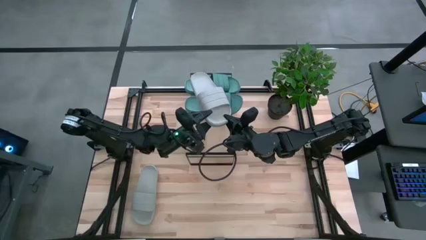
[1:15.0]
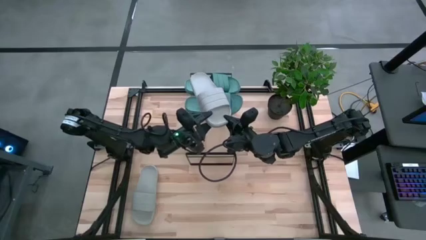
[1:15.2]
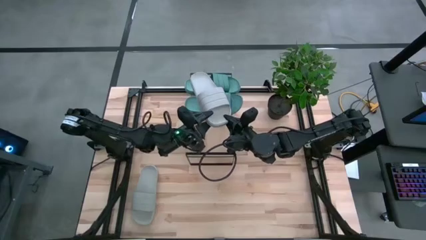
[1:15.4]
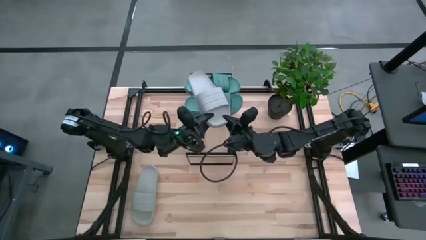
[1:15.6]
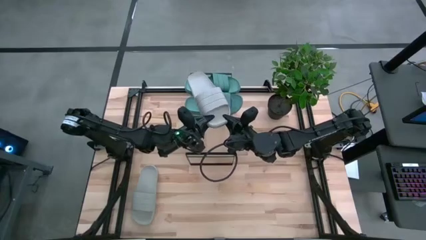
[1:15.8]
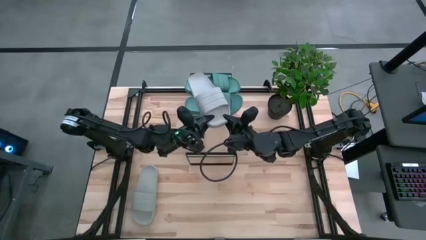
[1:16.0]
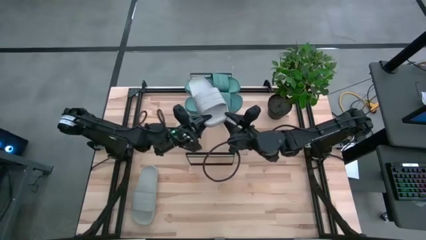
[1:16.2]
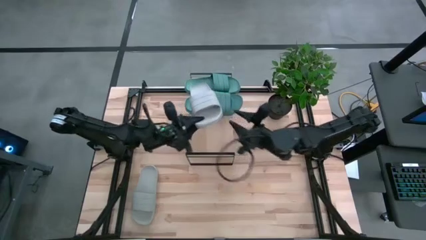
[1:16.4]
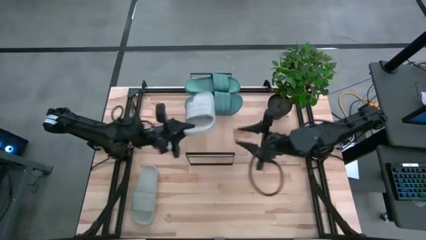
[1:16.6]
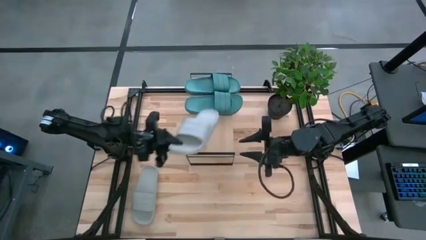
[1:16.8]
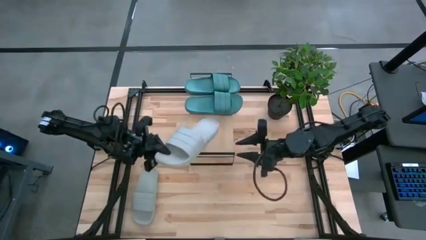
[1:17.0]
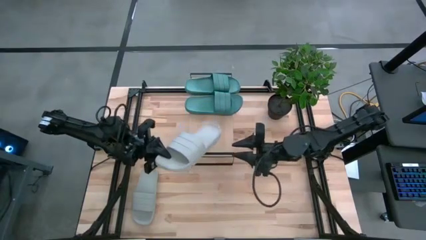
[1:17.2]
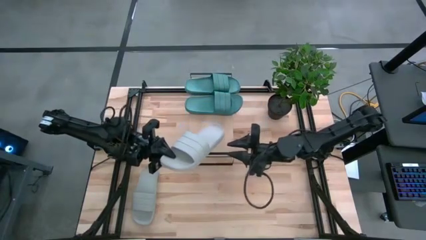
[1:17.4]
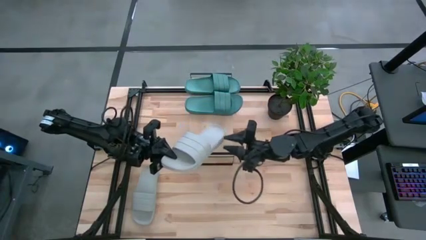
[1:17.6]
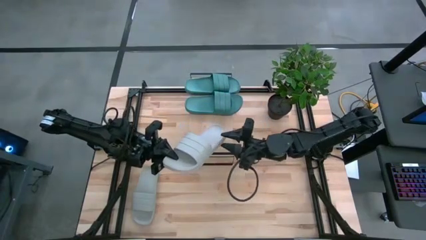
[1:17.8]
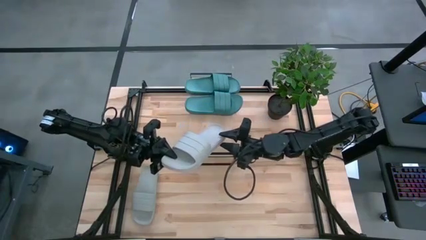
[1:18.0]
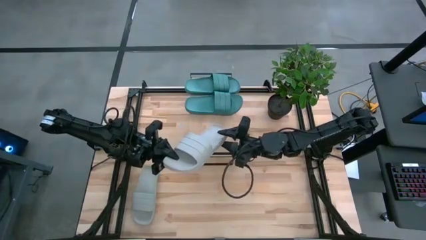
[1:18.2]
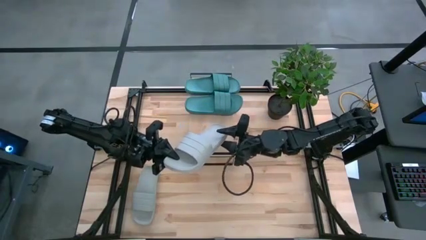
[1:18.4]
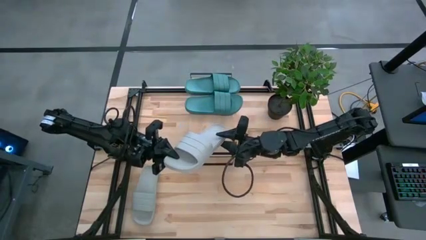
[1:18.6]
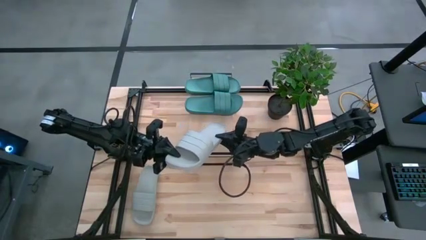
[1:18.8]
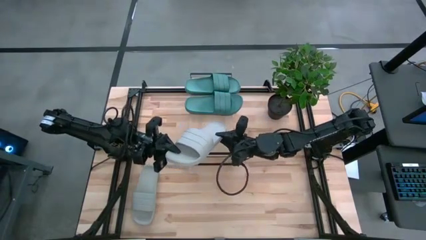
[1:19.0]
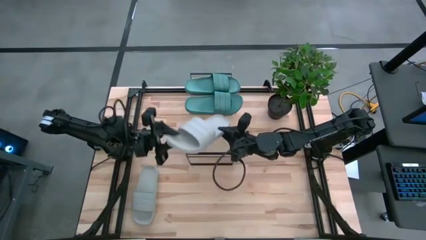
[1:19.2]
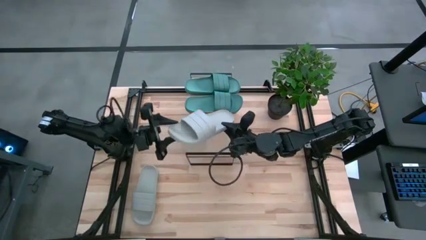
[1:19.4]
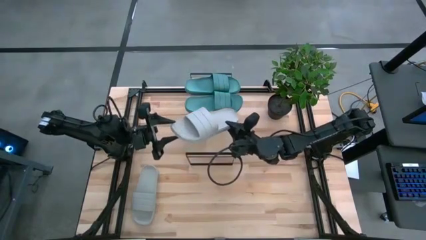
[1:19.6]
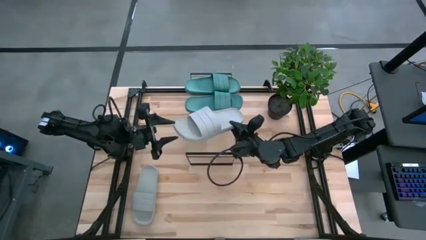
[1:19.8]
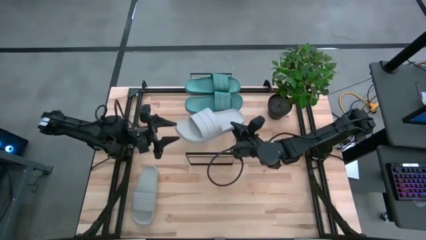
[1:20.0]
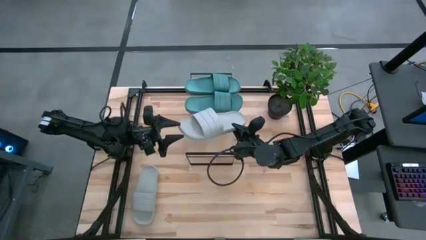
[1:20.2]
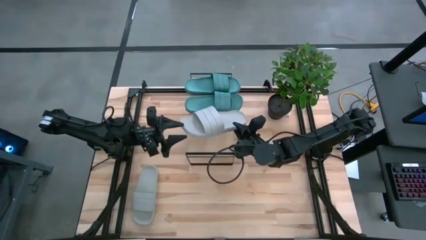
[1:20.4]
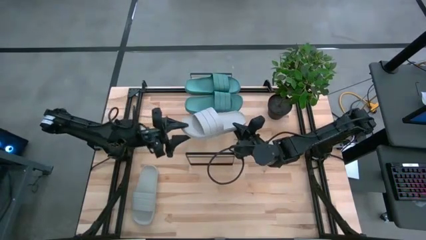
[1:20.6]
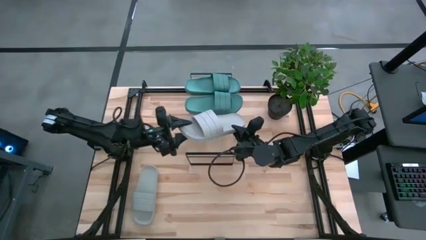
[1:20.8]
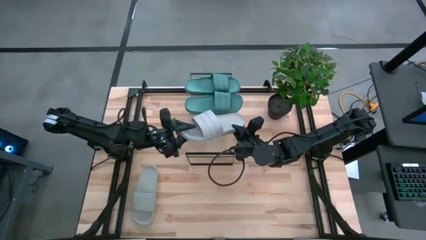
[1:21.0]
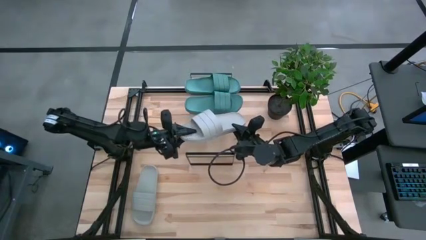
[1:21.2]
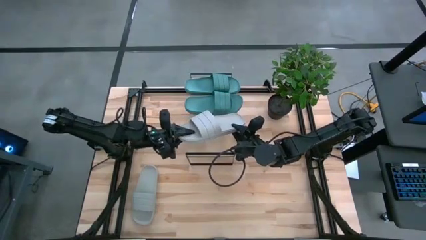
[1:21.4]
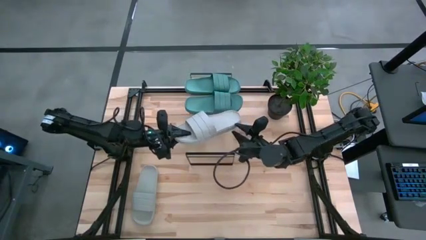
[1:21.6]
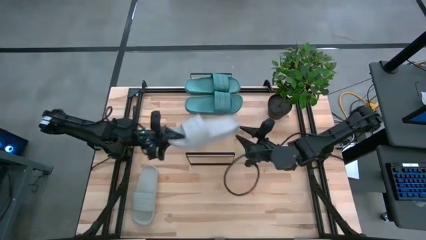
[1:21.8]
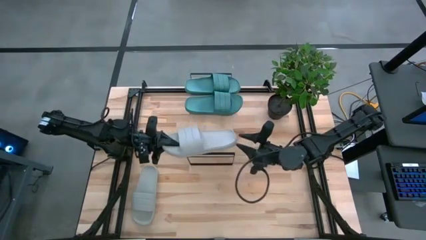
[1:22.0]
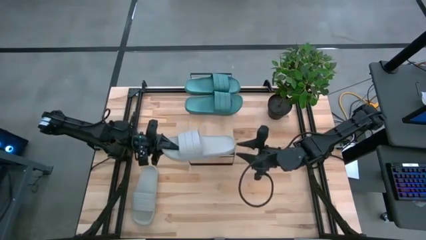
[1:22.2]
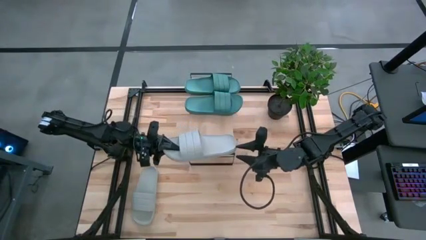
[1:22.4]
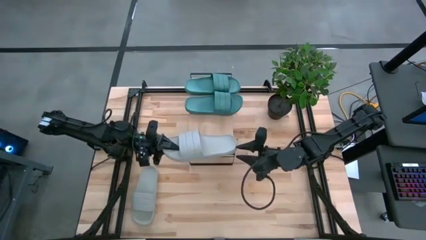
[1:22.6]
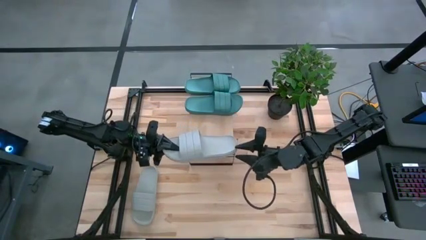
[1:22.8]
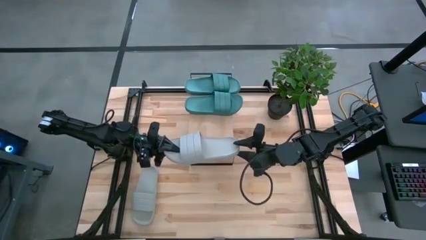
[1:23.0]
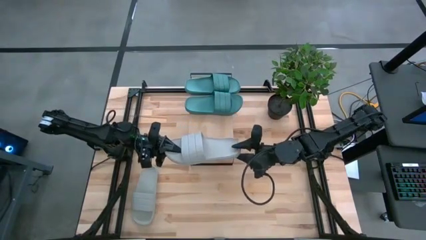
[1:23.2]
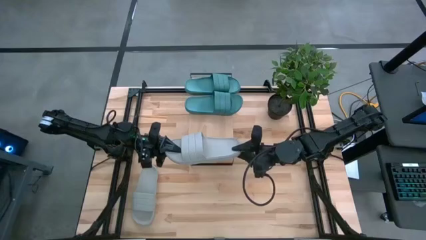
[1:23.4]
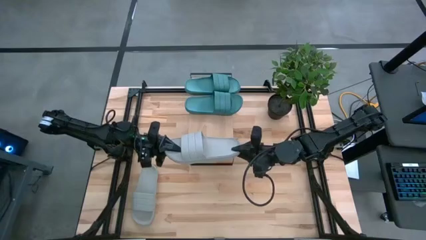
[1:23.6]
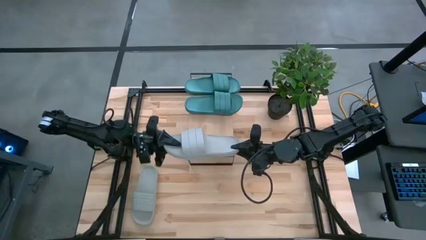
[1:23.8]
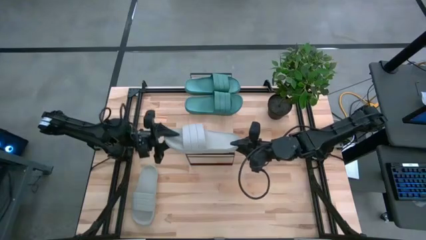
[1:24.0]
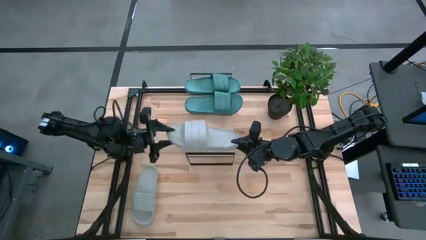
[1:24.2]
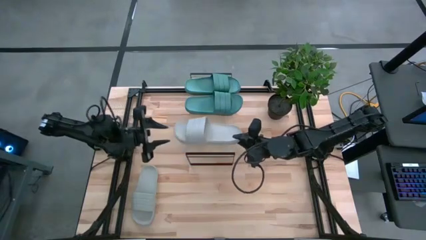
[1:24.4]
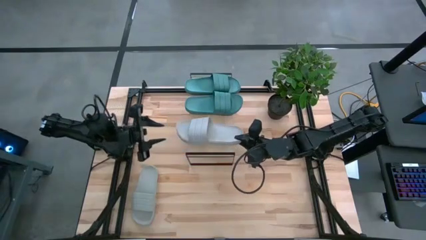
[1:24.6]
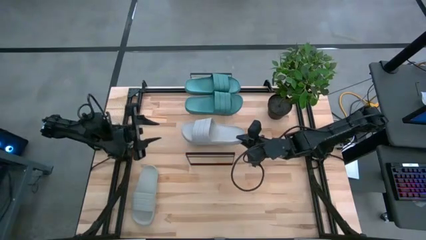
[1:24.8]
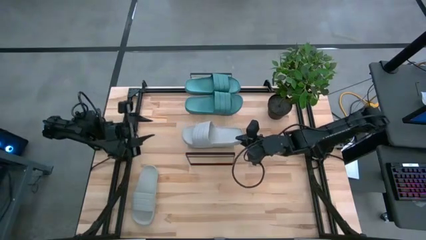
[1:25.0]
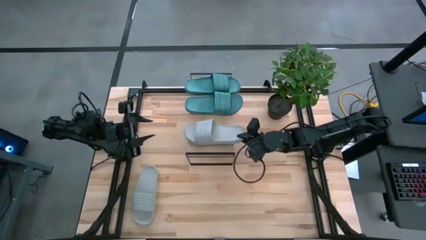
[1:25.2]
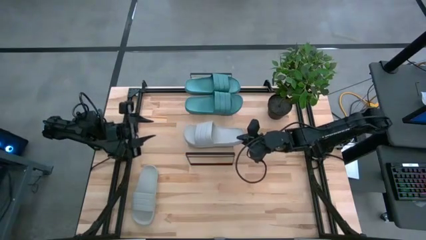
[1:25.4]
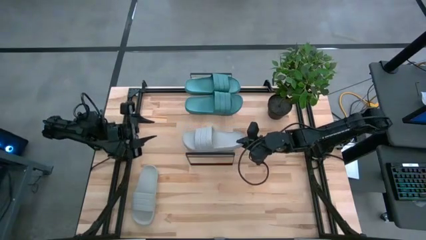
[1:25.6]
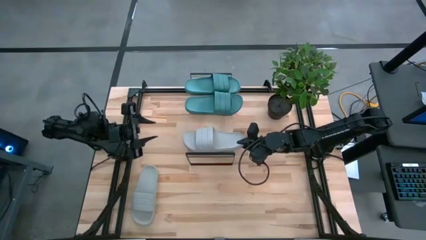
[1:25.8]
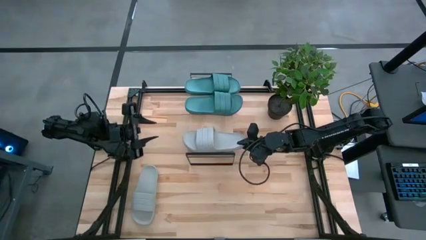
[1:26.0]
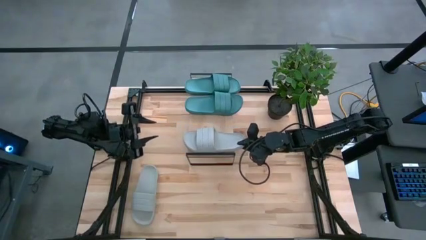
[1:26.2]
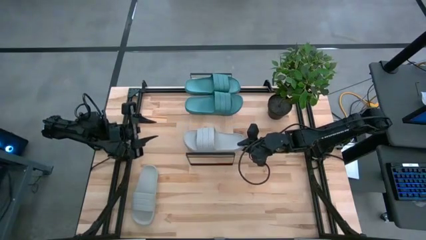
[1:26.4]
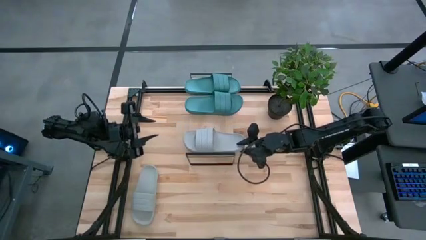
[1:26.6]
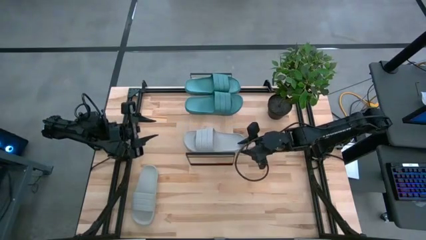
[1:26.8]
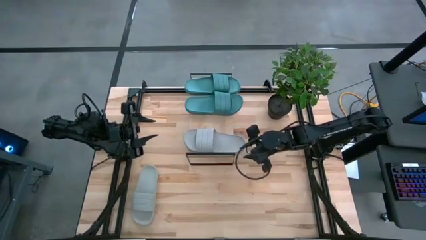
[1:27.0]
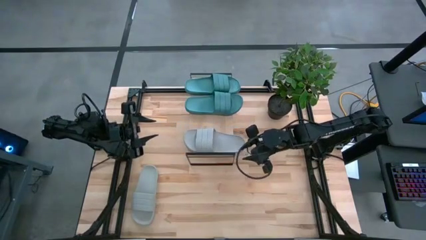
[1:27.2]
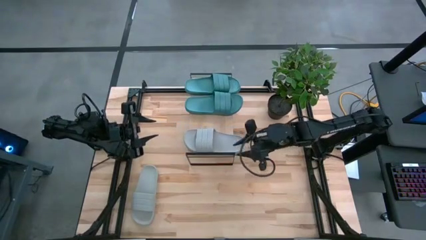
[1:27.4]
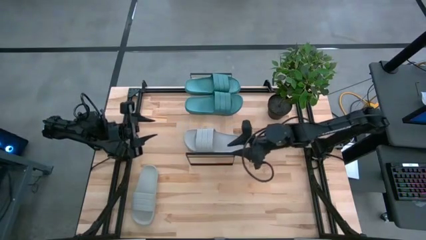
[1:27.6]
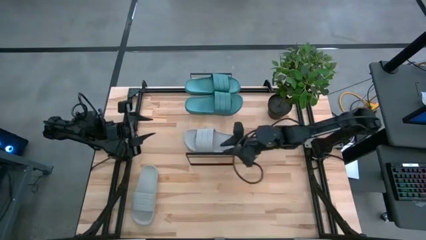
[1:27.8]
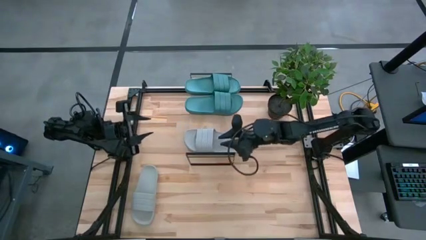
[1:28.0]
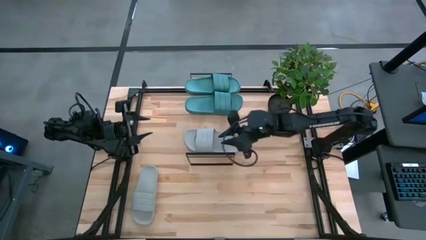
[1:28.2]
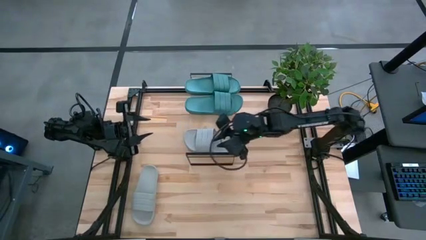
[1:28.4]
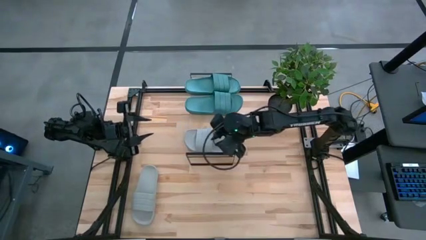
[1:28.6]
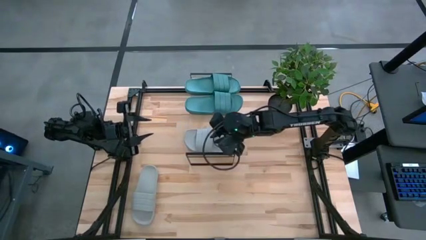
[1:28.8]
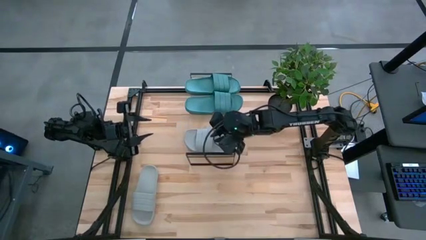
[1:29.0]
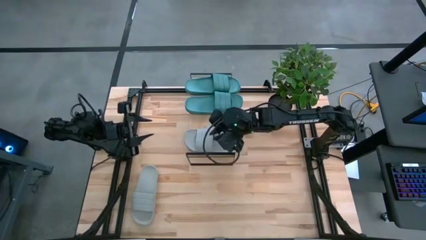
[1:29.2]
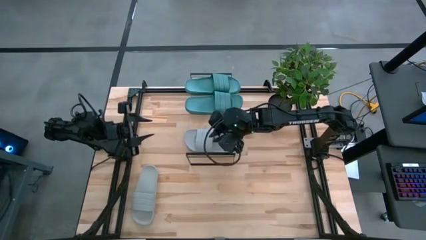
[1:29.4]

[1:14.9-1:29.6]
Task: Pick and place slides into the shelf
Put the right gray slide on the shelf
